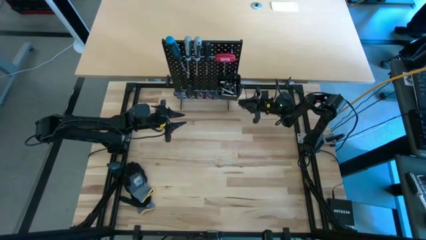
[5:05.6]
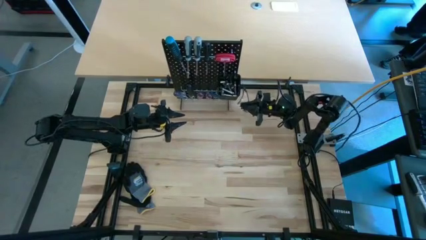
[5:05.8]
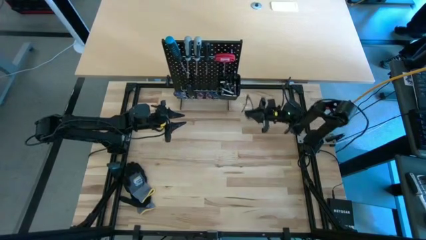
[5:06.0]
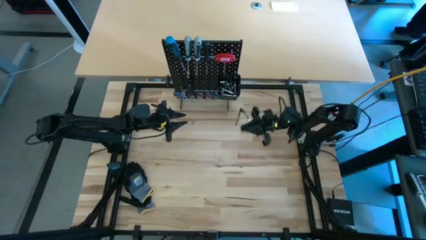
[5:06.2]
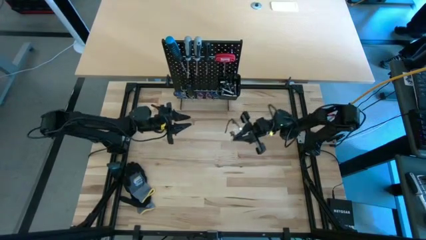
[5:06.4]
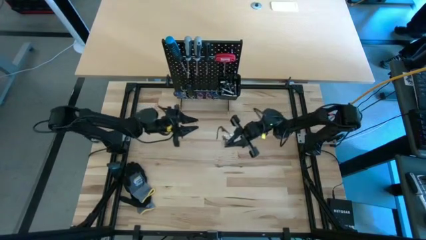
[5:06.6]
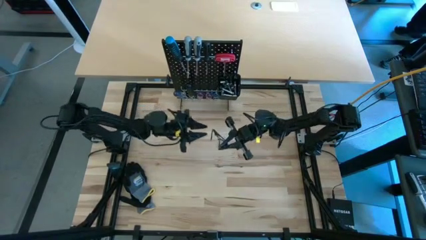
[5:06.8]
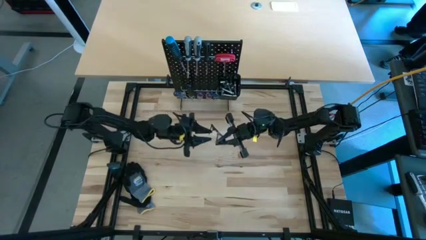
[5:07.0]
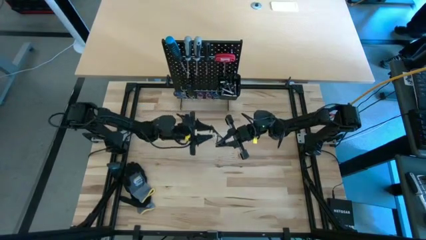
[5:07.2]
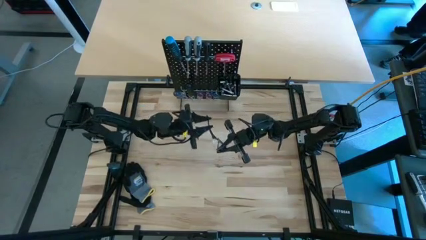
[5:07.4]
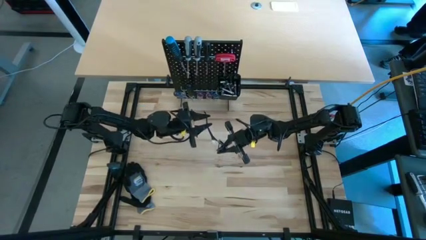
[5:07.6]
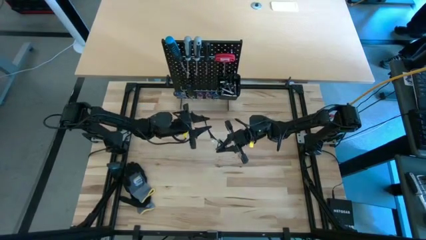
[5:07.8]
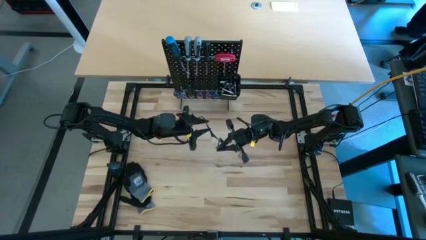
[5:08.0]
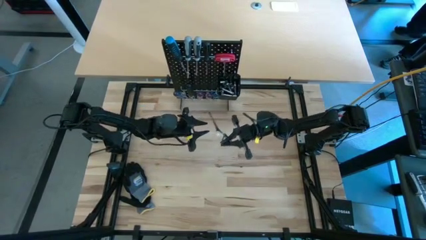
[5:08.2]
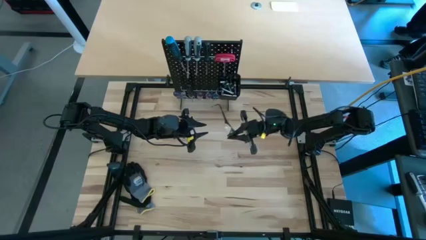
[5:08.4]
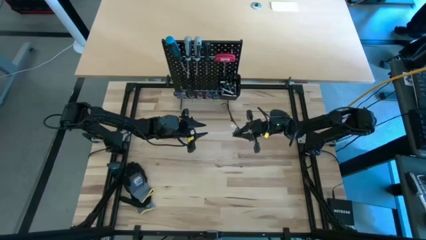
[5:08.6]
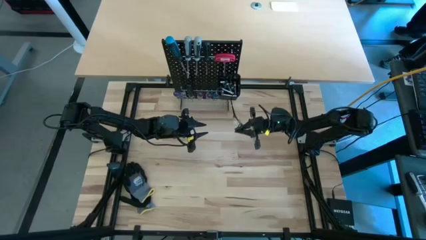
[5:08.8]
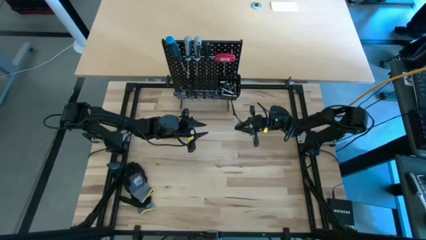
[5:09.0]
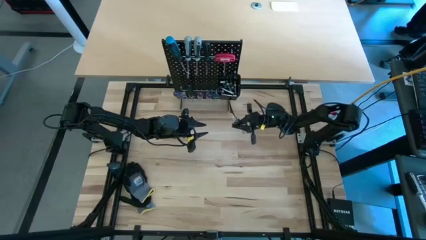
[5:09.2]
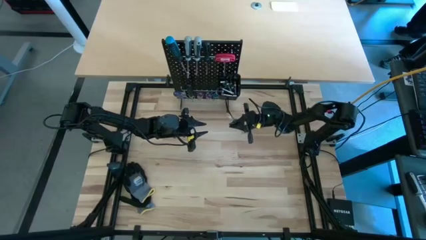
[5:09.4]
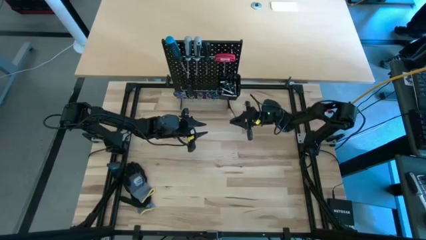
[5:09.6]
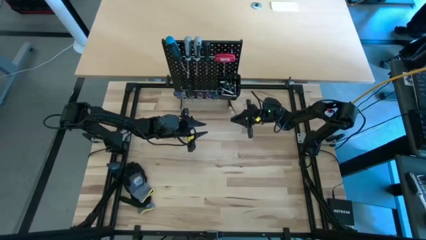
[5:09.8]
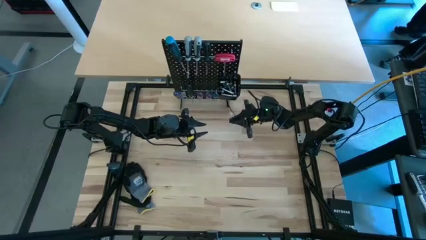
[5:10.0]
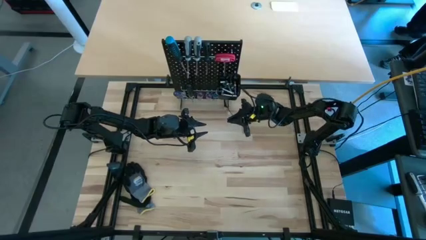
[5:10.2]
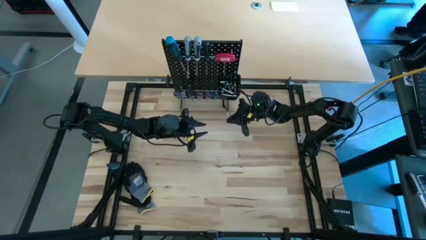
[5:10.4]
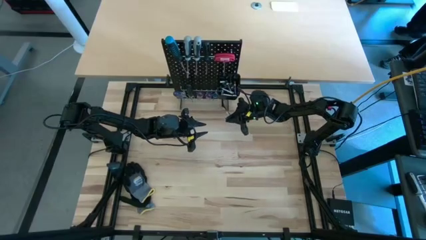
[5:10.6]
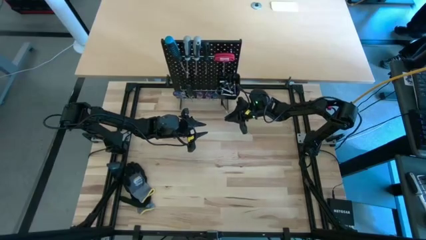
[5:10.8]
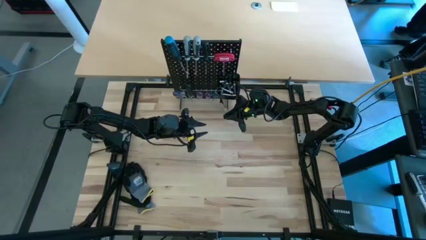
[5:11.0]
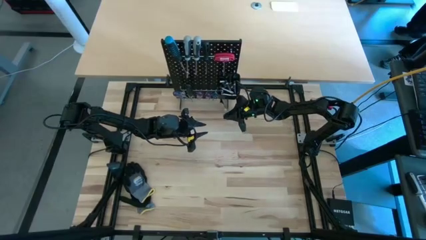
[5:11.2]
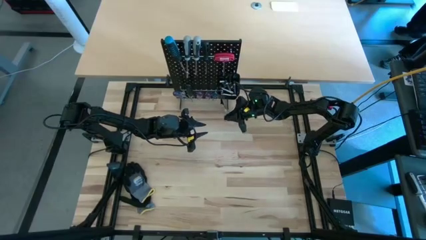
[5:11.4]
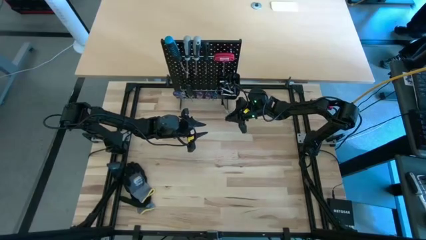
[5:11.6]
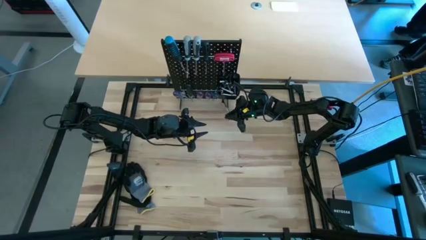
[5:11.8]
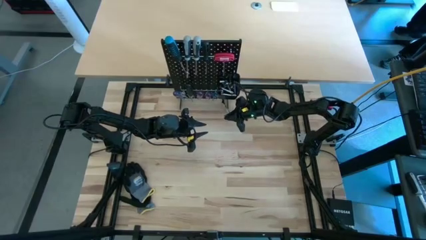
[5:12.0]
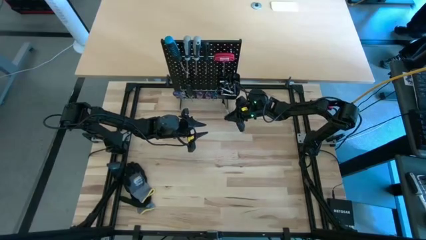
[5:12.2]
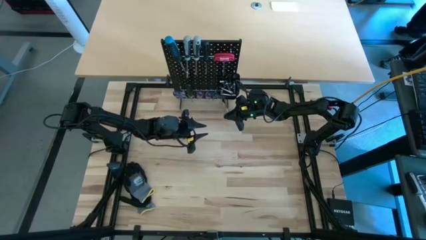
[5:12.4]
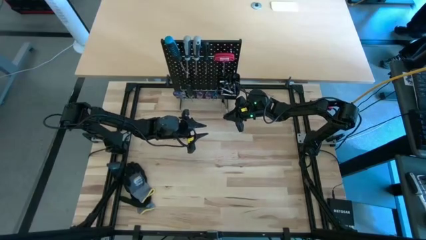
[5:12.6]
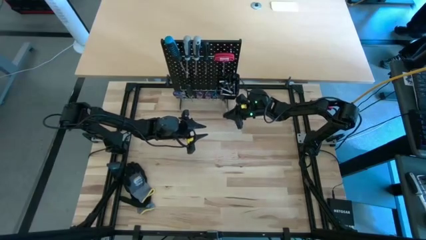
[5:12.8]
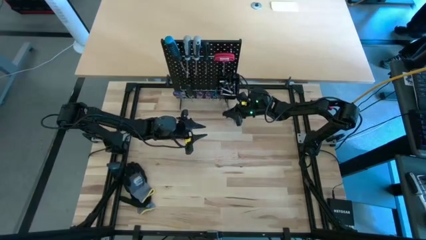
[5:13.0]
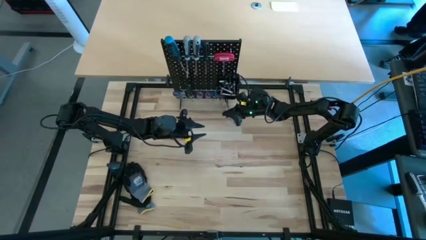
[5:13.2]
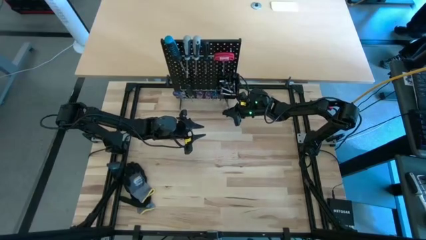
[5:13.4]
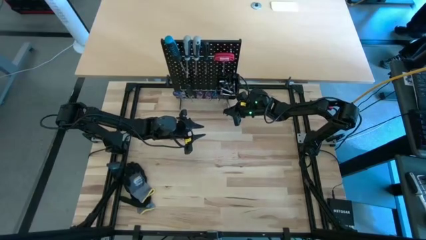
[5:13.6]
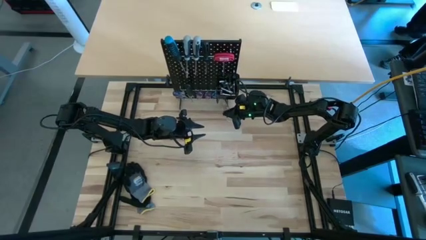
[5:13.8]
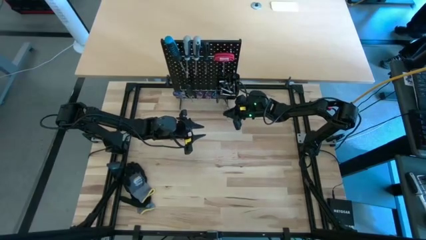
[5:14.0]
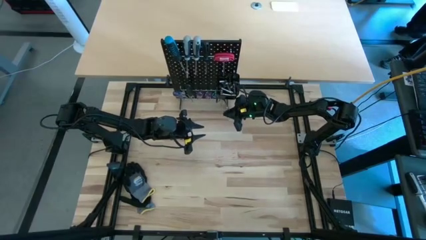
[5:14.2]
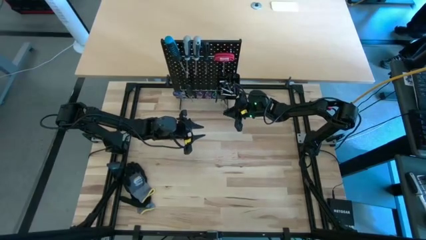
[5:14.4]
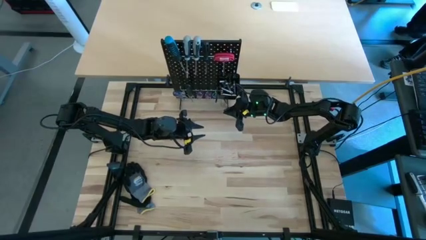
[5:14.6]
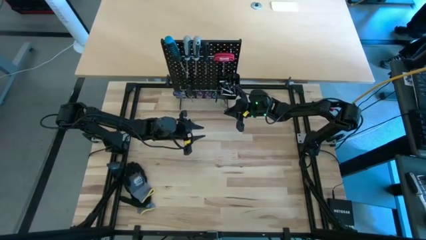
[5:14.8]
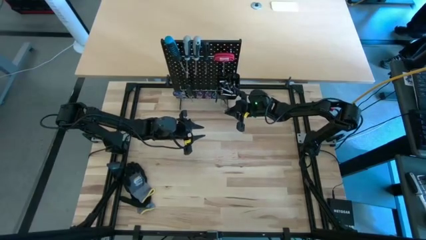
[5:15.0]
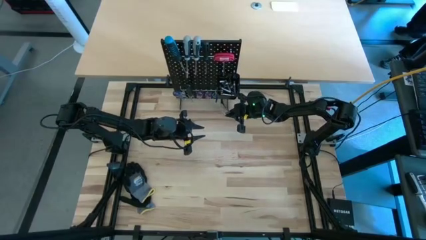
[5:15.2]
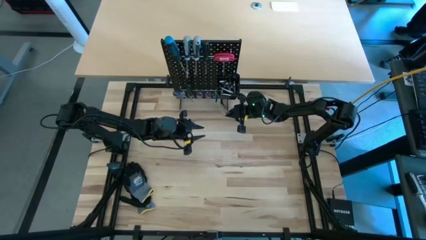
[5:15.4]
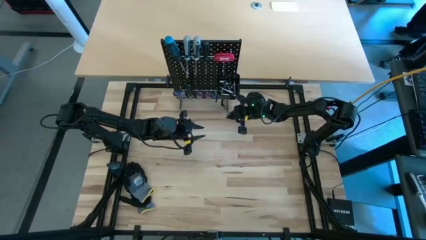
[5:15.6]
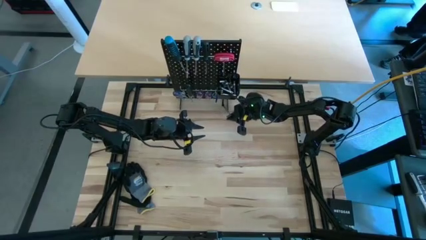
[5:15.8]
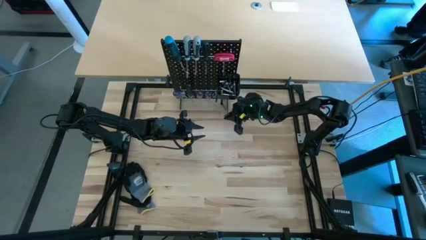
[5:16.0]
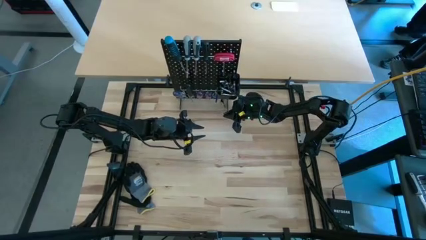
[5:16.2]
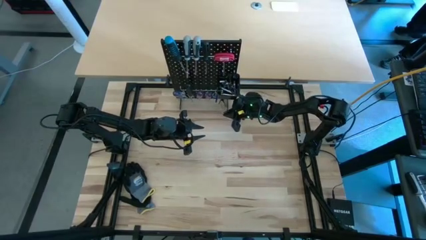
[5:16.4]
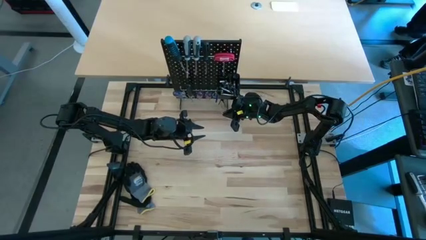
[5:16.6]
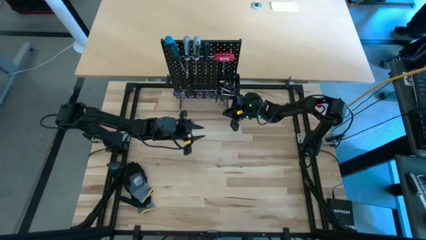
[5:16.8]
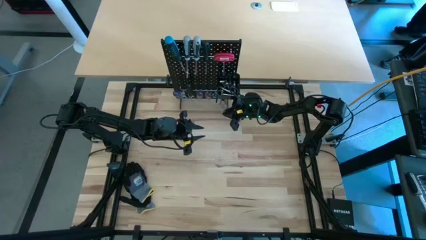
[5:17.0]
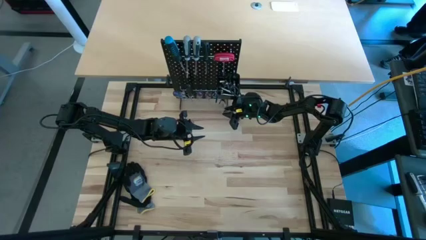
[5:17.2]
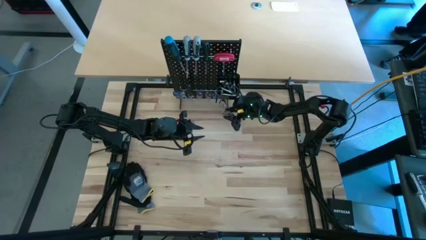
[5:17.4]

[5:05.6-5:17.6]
Task: Hang tools onto peg board
Hang the black safety goggles on the peg board

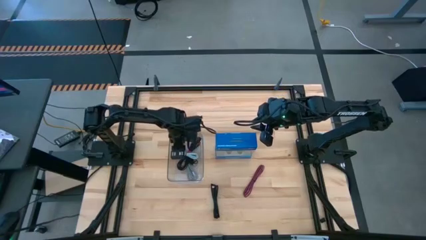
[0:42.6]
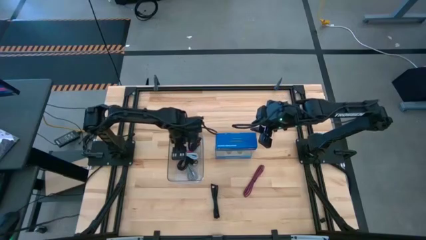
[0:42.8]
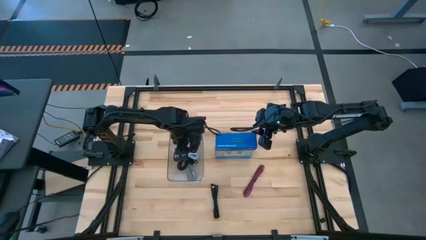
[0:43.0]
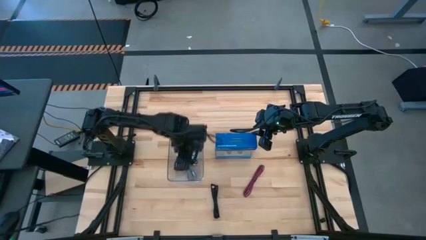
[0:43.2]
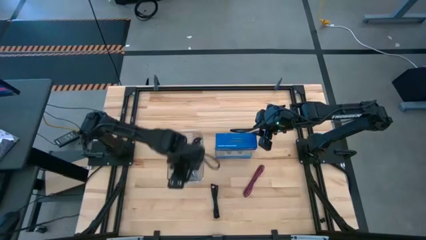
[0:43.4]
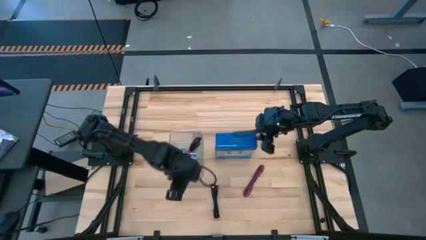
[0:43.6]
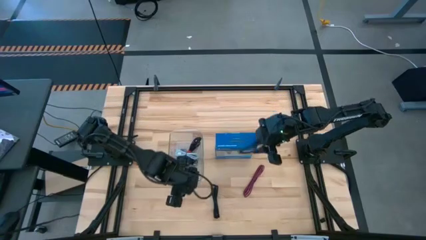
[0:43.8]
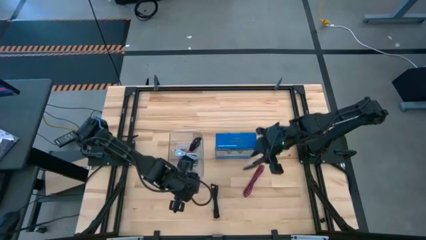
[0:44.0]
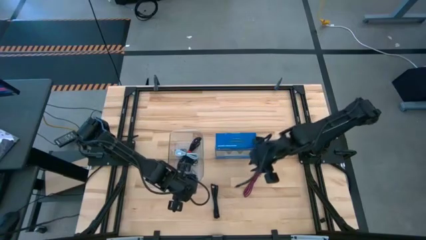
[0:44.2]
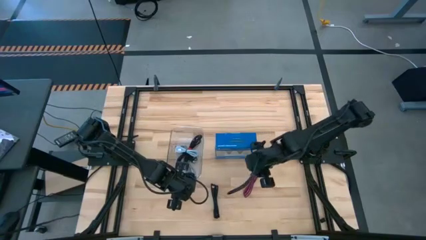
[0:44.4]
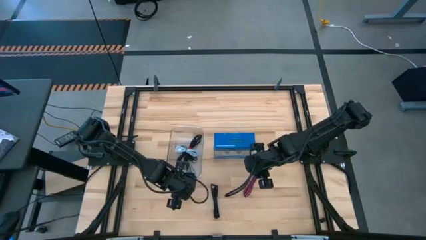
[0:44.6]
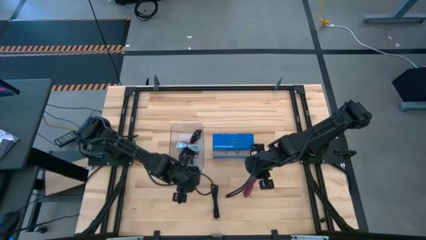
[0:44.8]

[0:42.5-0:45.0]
Task: Pick and place USB-C Cables
Adjust the transparent bin
